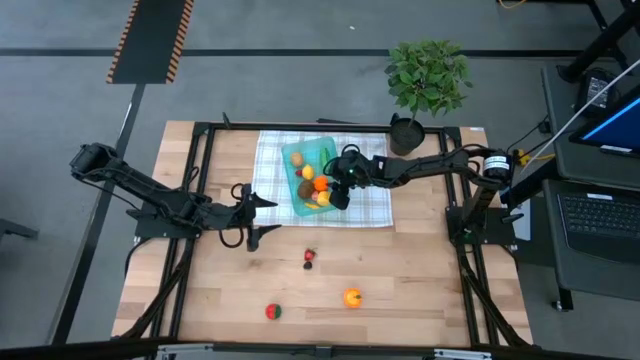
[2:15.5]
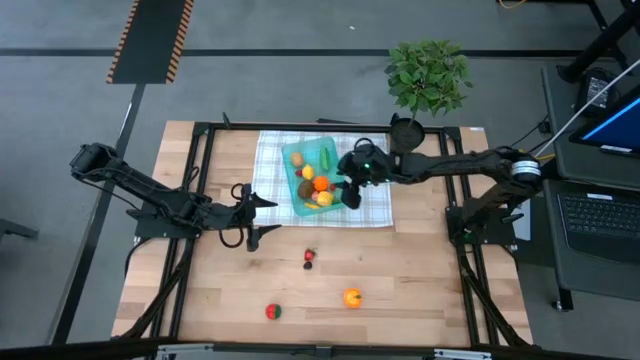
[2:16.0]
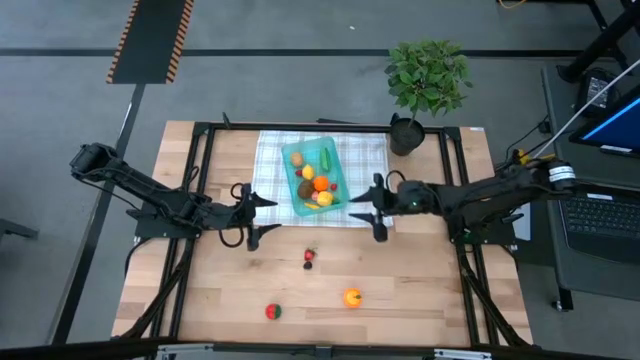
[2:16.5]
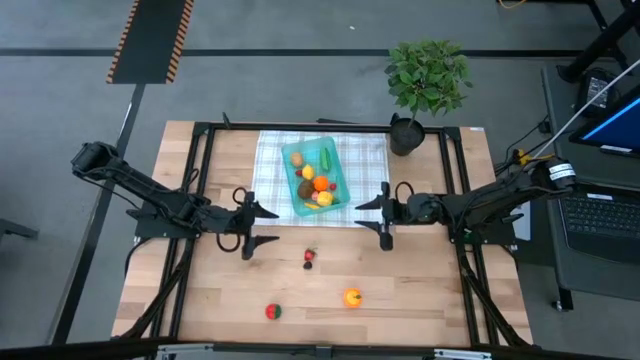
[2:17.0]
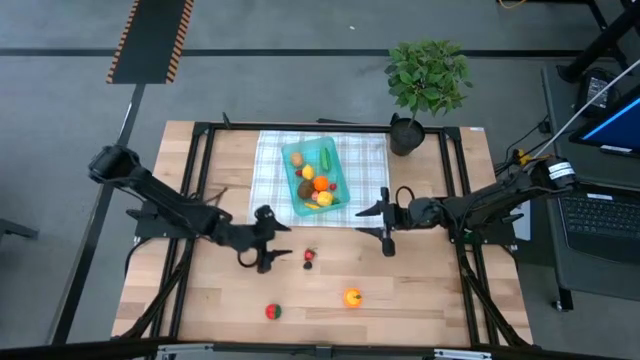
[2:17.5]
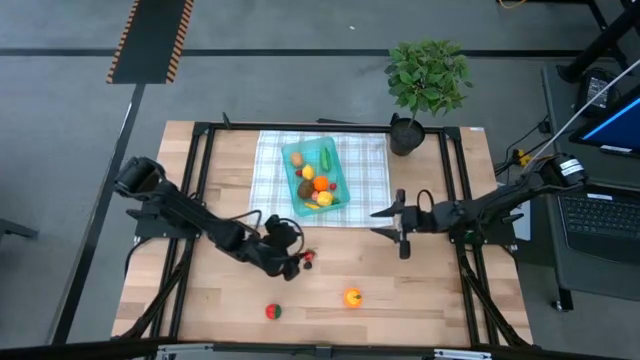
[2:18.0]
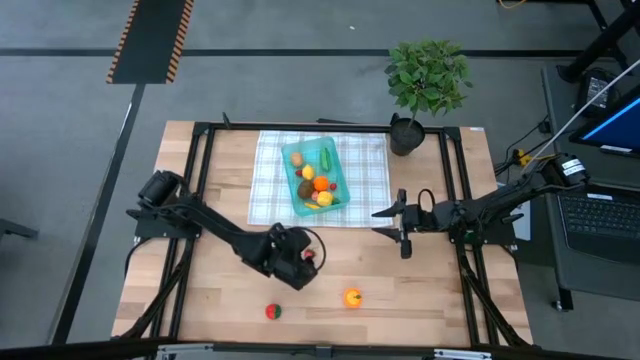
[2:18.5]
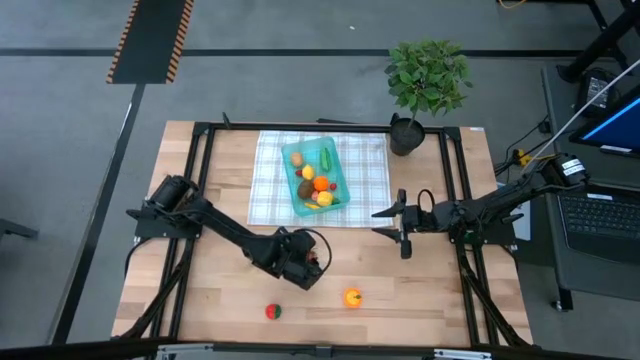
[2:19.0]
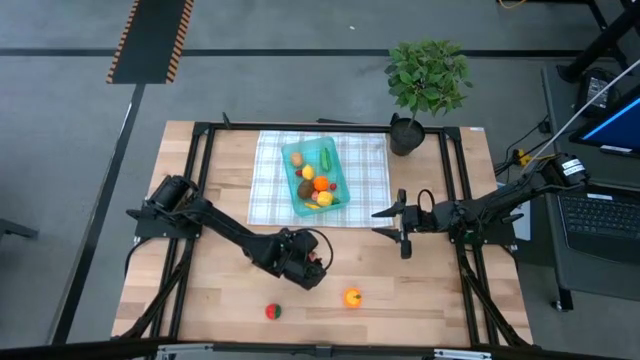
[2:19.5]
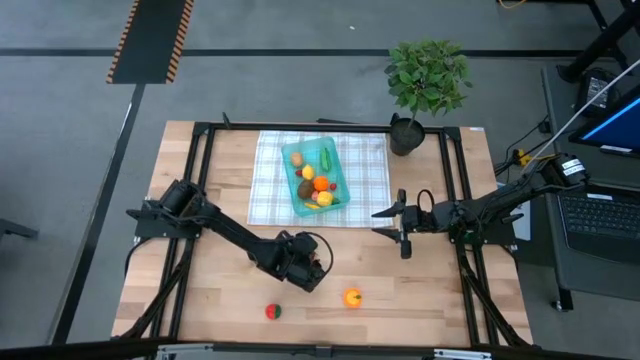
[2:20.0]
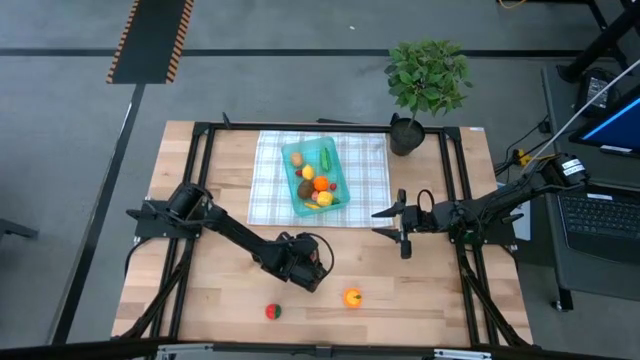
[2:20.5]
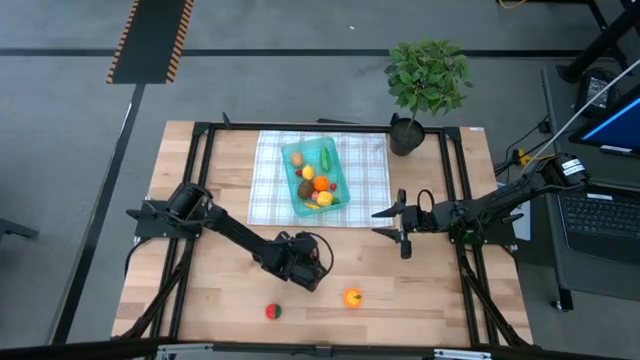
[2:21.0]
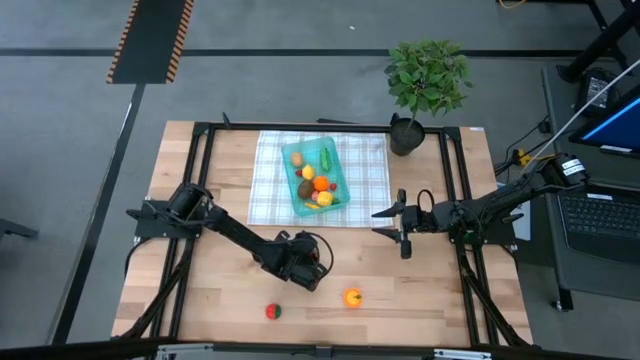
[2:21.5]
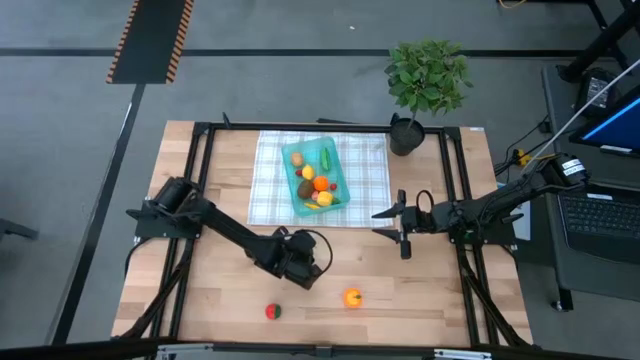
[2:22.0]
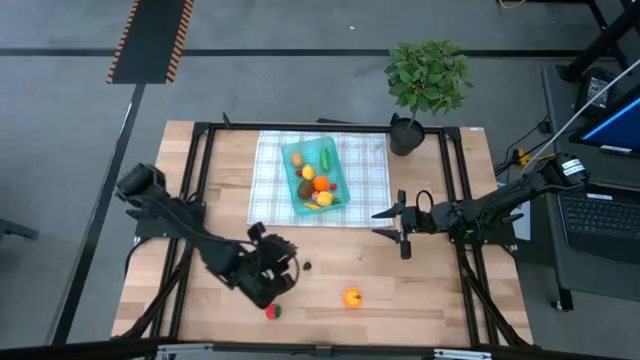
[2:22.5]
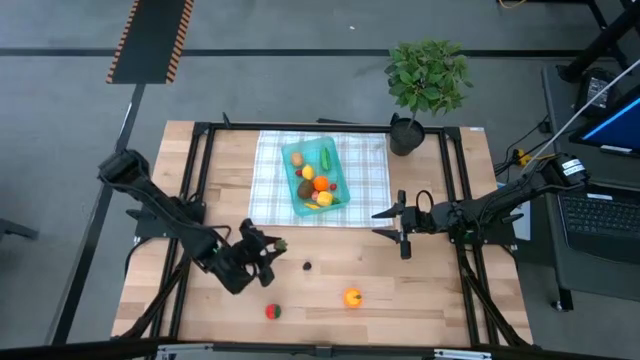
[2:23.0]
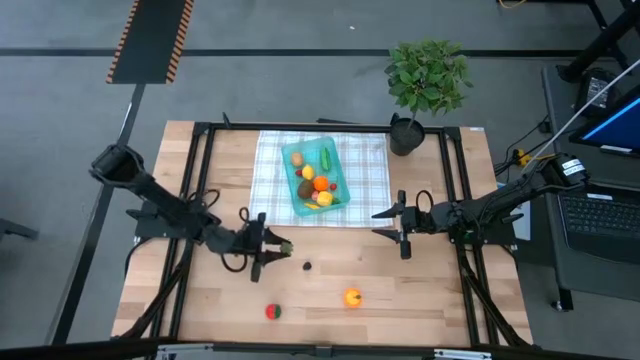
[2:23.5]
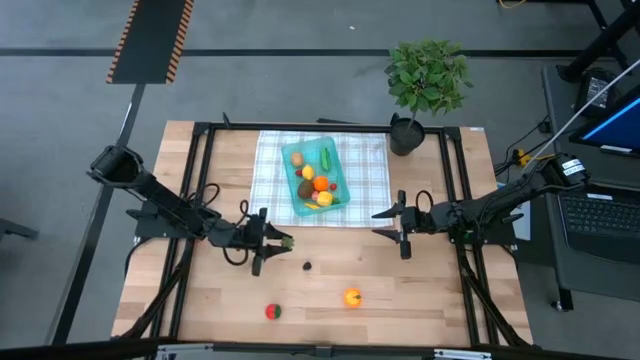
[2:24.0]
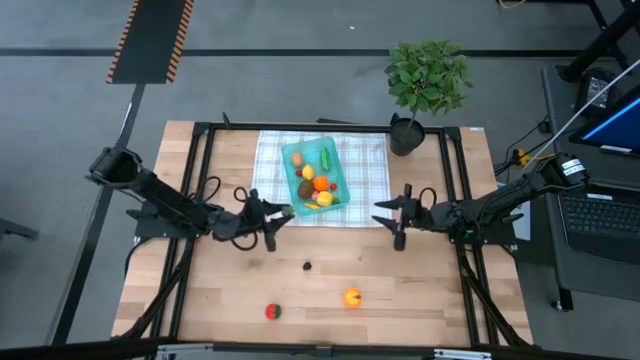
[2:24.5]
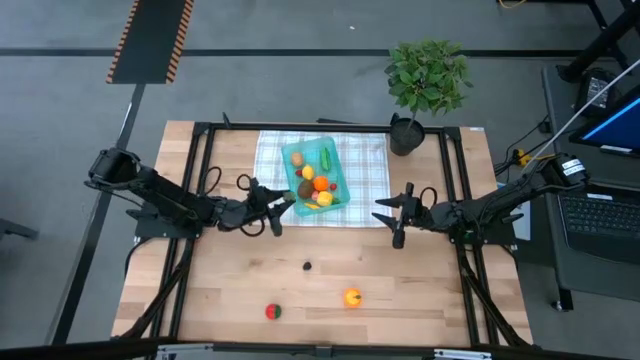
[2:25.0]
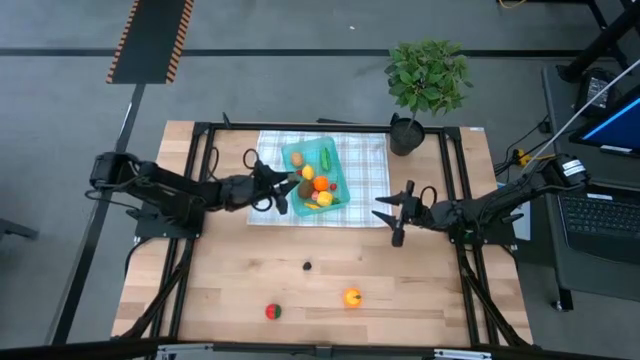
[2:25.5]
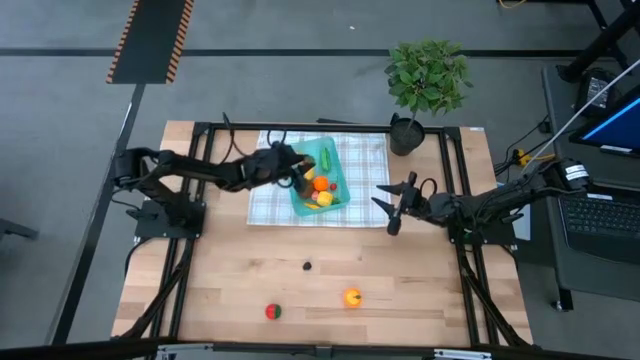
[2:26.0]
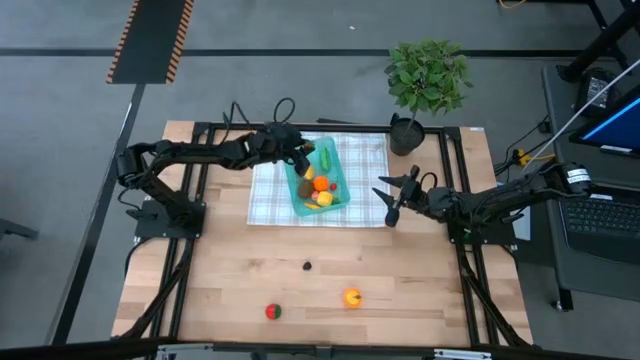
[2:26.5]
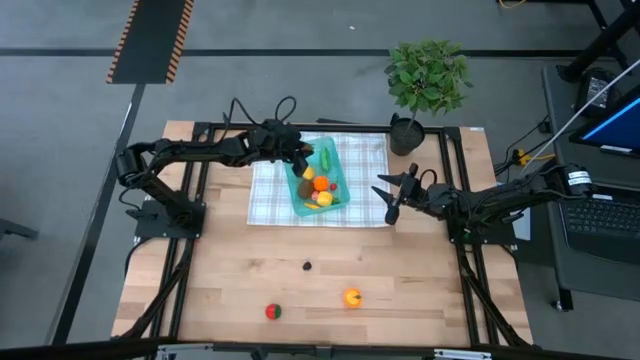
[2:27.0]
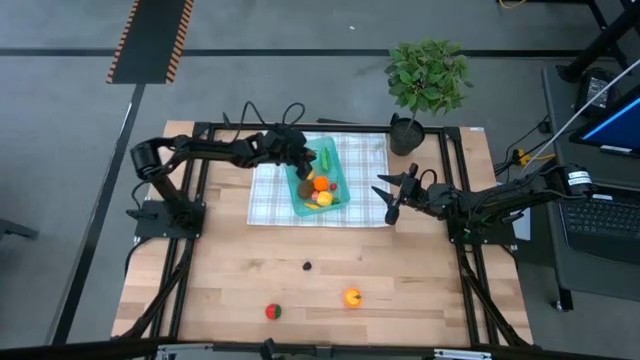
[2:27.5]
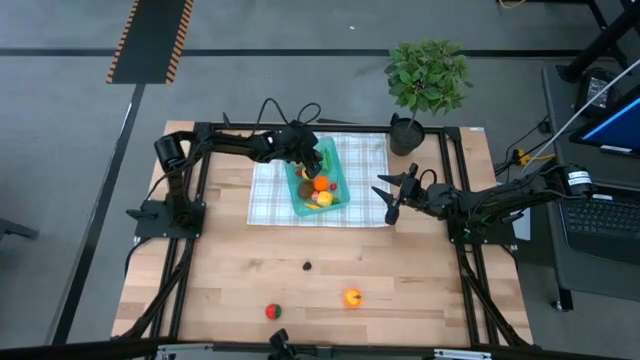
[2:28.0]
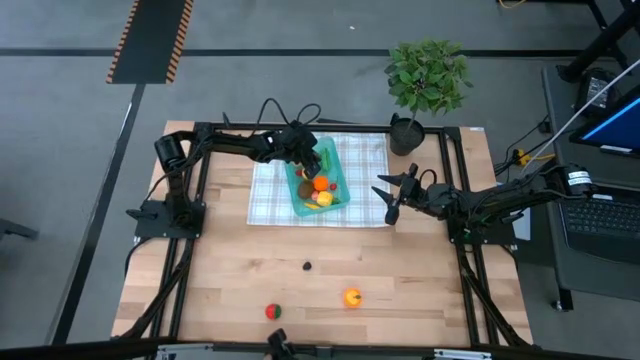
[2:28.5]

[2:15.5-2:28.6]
Task: Pick and placing Produce into tupperware
Put the top red strawberry into the blue bin

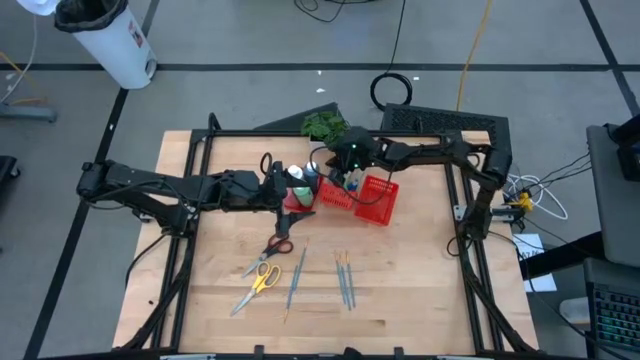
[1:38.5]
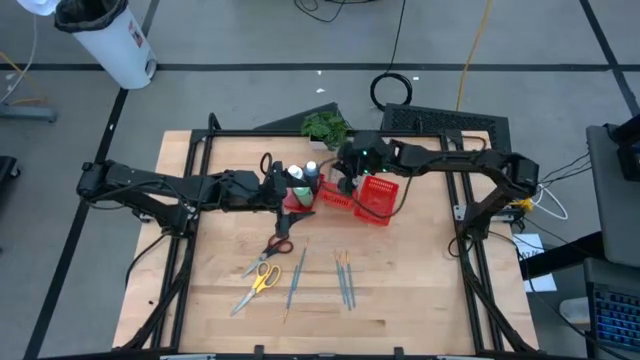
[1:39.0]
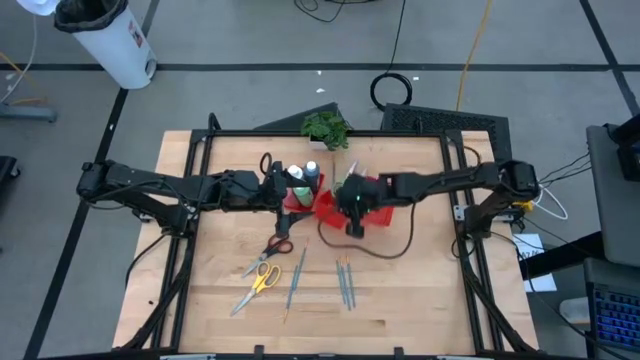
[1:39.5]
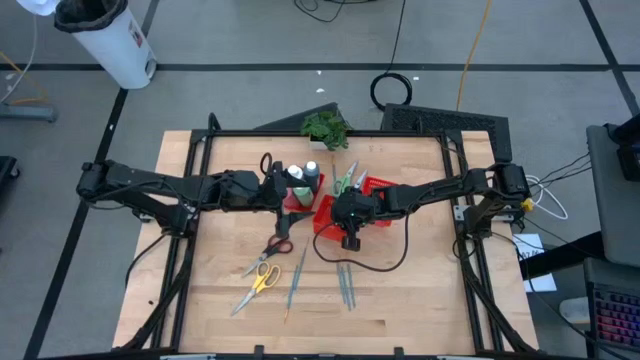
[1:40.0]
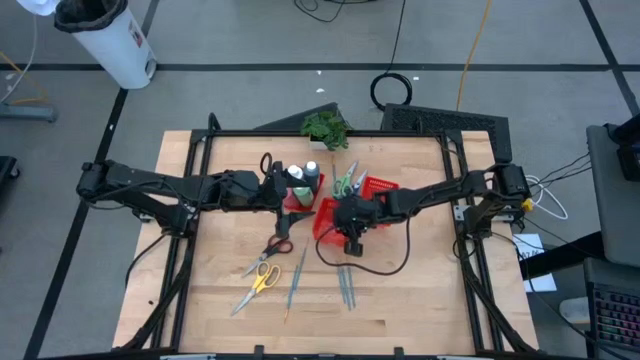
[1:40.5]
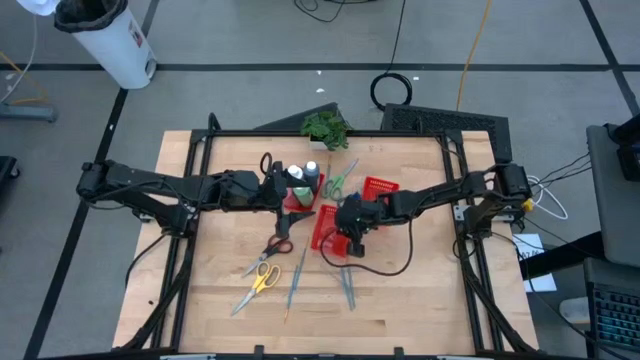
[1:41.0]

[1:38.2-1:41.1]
Task: Pick & Place Paint Supplies
Adjust the middle red bin on the table

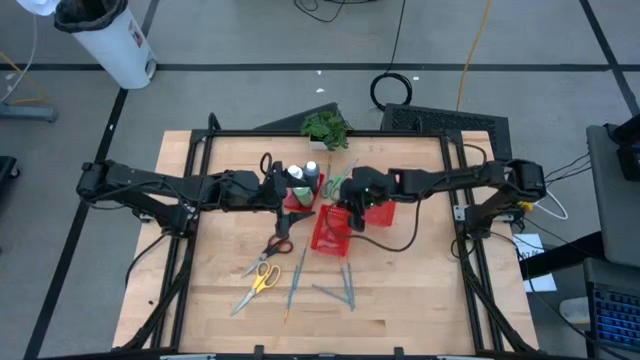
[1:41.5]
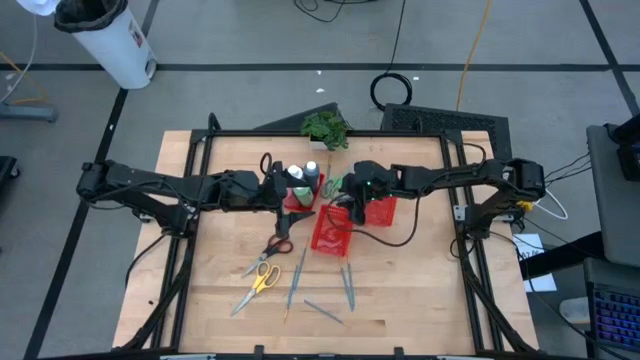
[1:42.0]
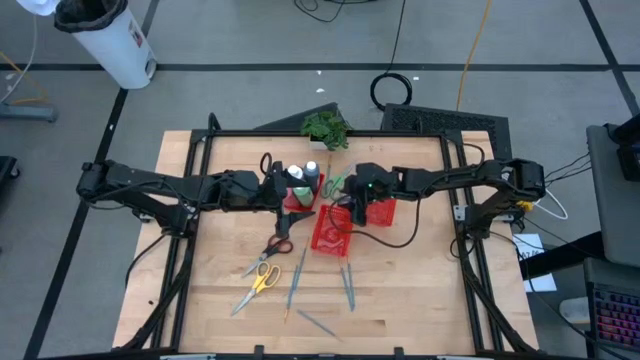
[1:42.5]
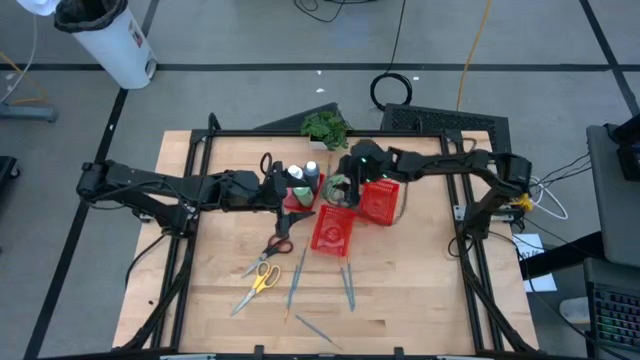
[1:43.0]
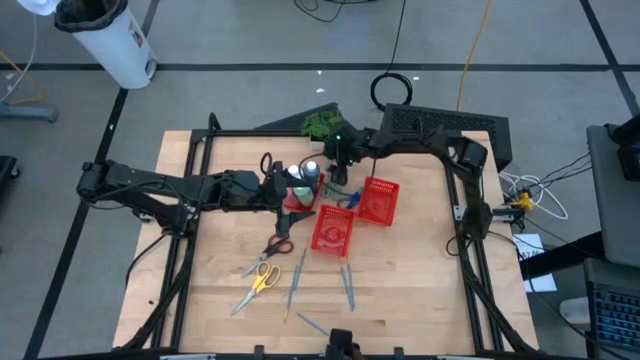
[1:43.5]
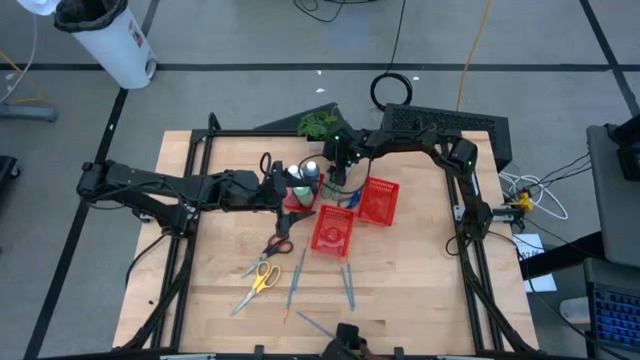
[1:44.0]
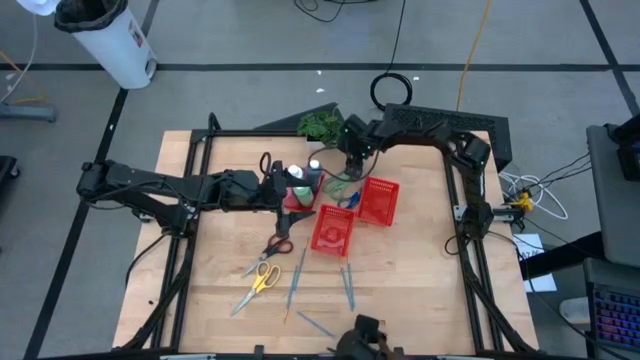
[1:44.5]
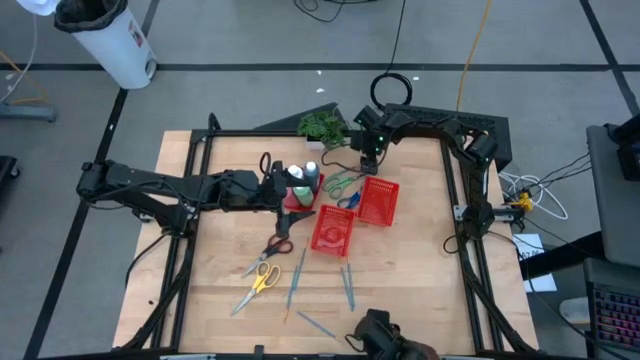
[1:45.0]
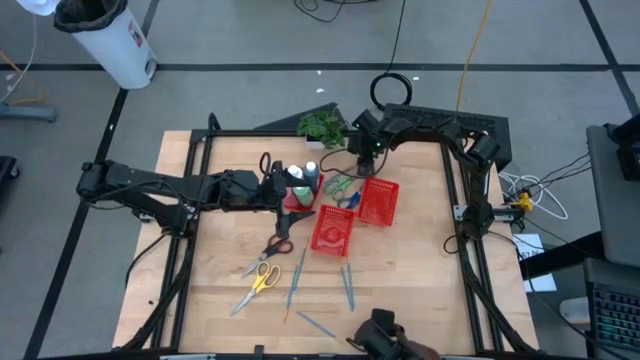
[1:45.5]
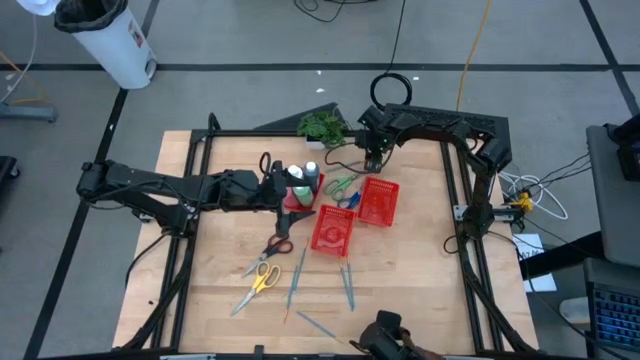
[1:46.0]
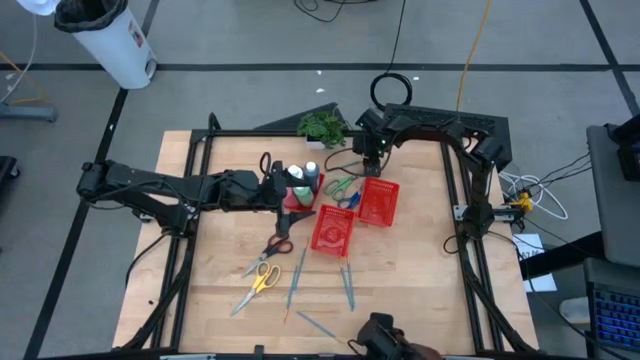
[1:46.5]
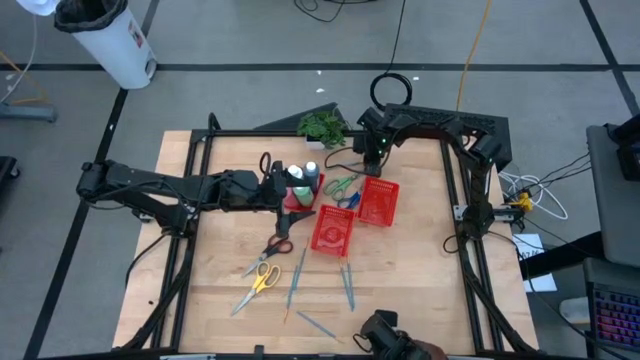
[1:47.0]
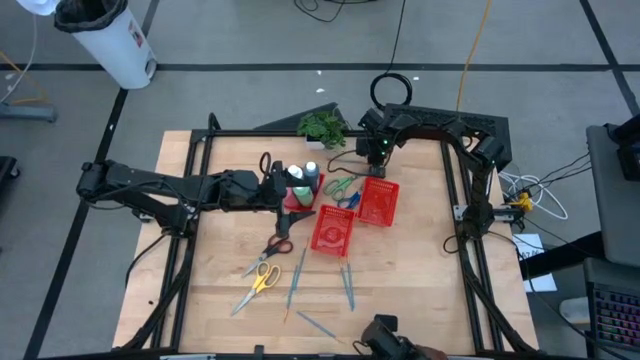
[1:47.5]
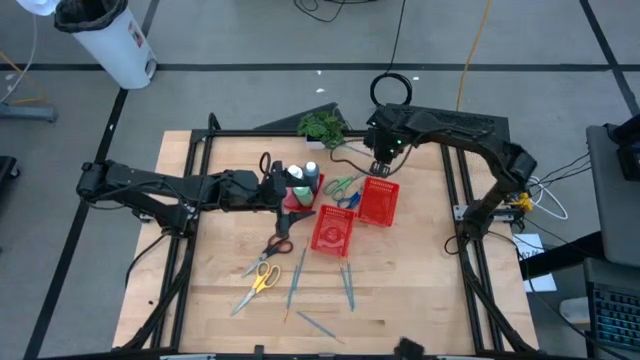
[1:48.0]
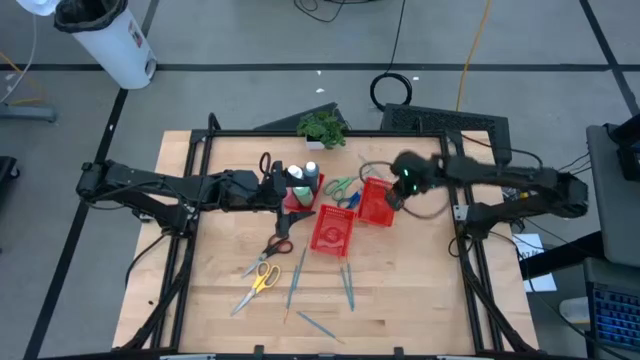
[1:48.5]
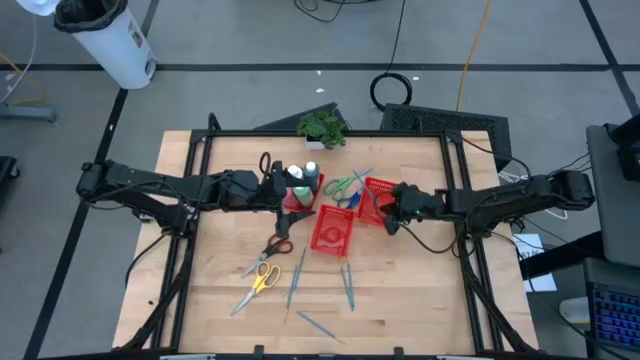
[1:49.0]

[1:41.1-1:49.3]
Put the blue paint brush into the right red bin
